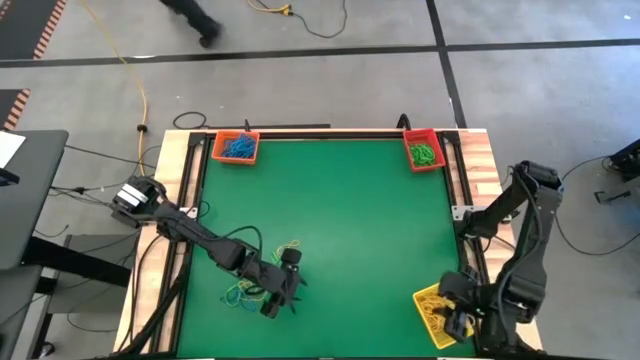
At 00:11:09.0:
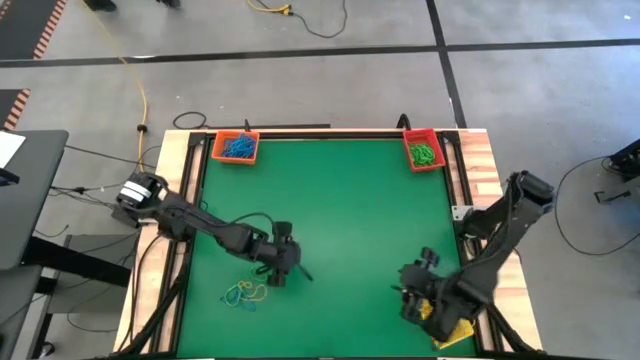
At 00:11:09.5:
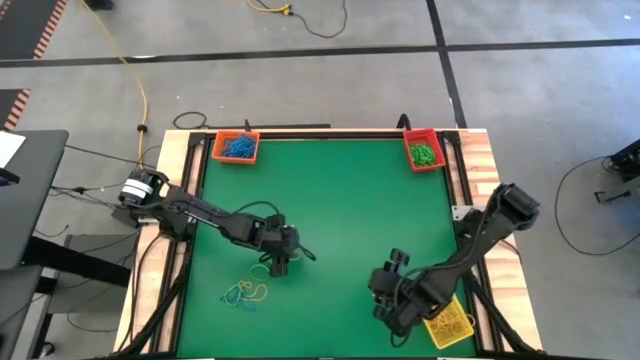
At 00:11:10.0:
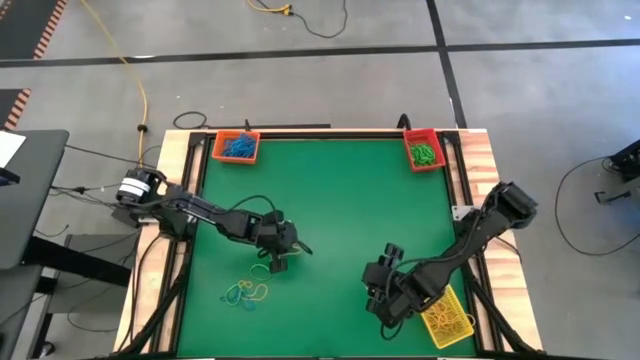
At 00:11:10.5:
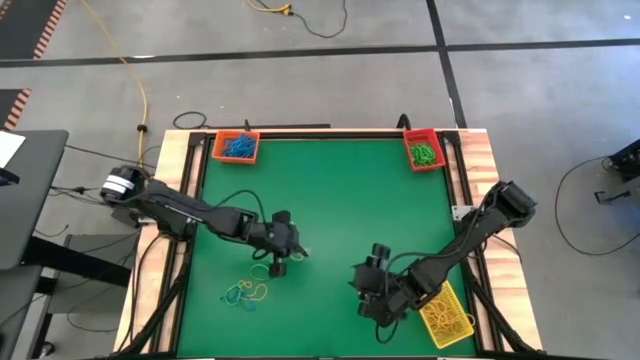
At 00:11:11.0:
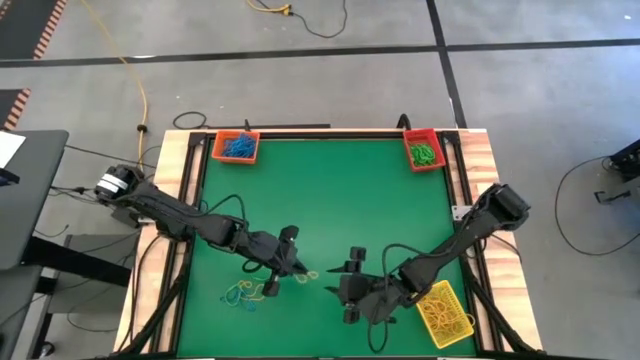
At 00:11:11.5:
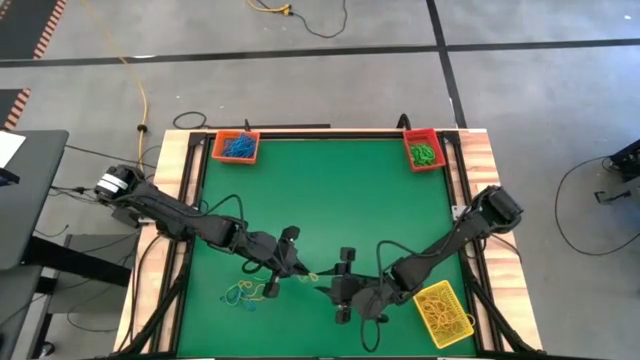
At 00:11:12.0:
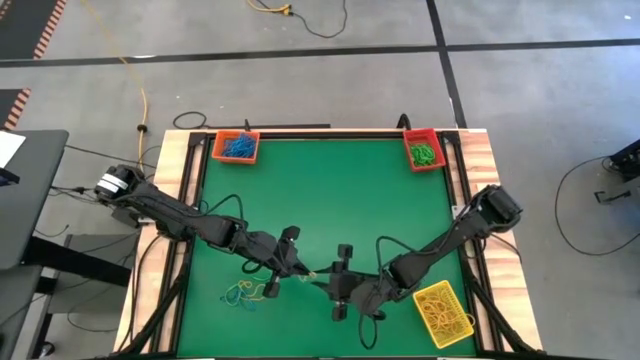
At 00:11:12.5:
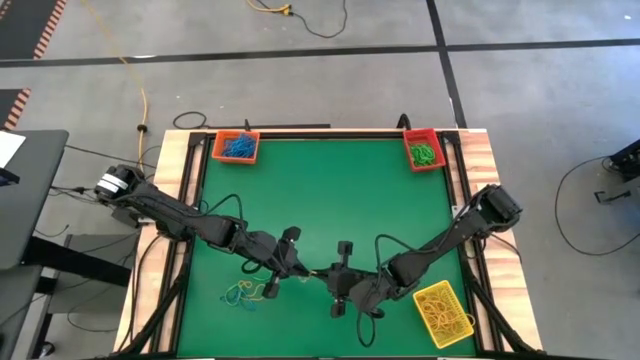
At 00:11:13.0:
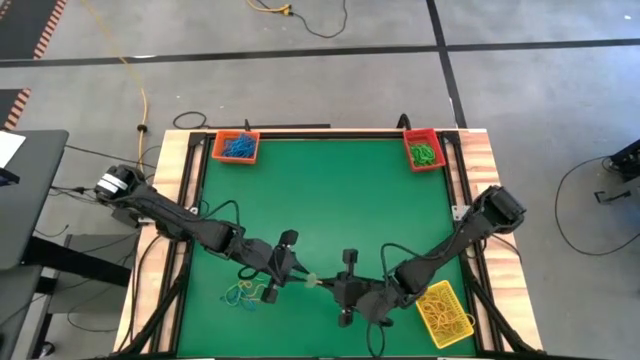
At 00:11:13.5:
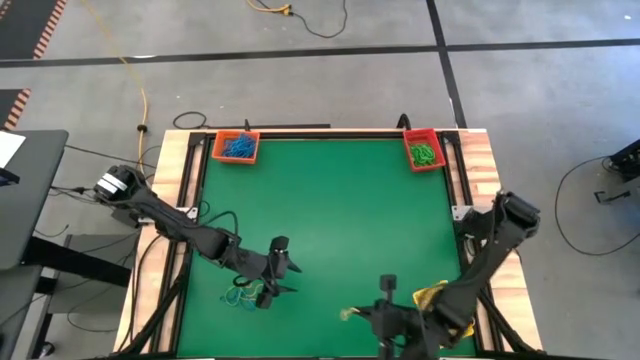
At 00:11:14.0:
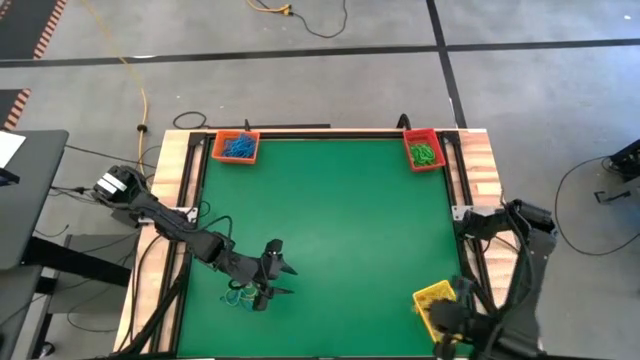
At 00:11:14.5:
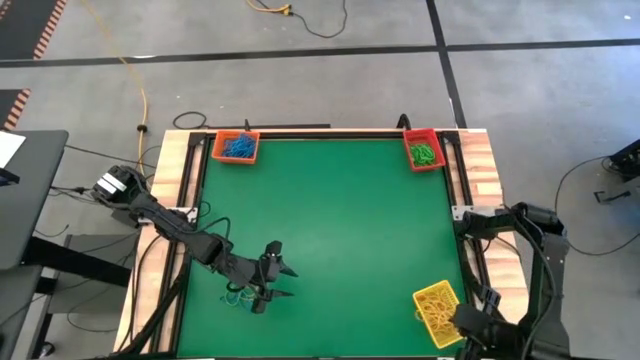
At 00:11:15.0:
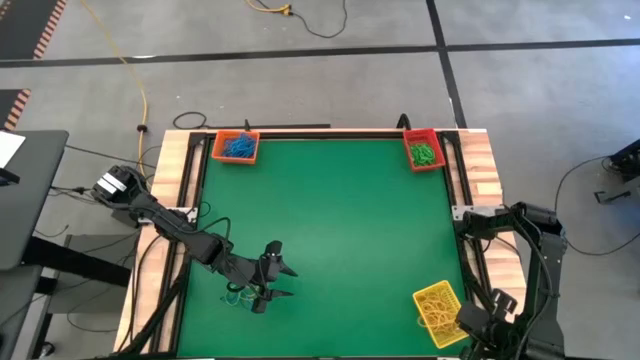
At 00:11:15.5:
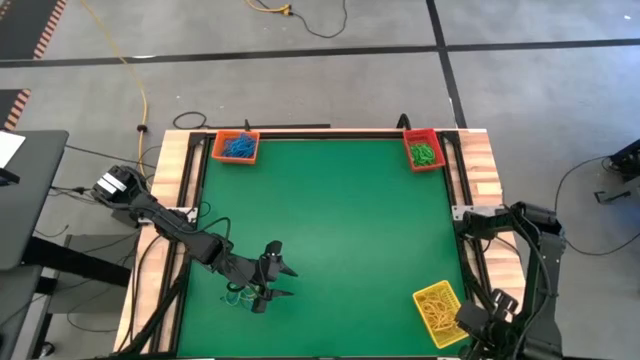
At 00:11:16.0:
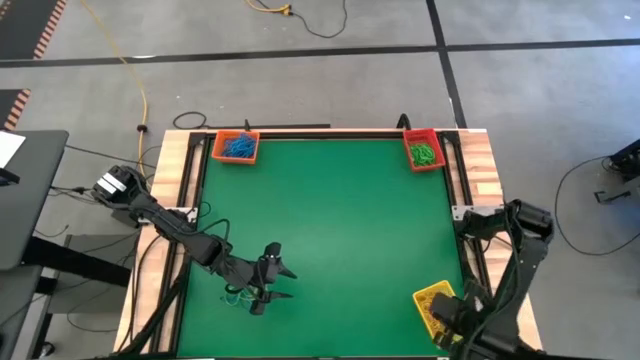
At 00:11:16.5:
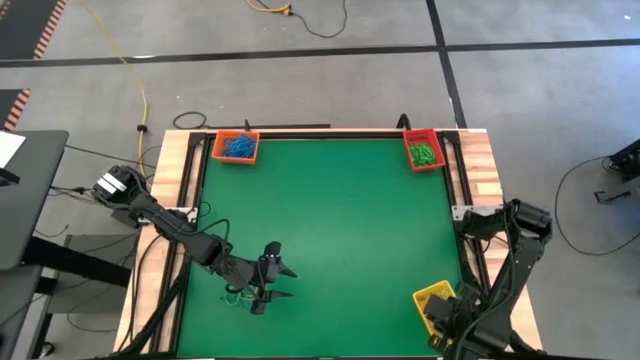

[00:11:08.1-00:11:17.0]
Task: Sort rubber bands into baskets
Put the left yellow rubber band into the yellow bin

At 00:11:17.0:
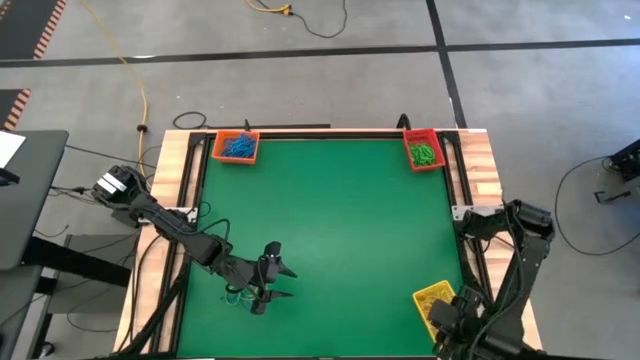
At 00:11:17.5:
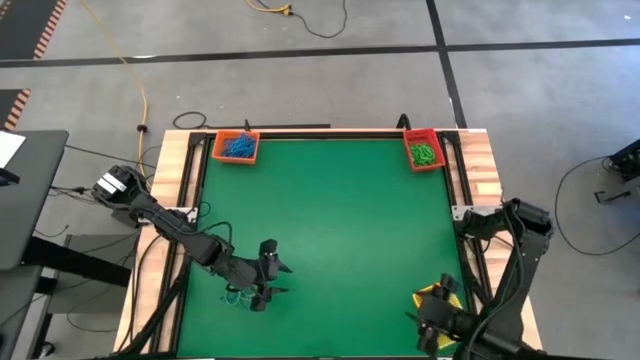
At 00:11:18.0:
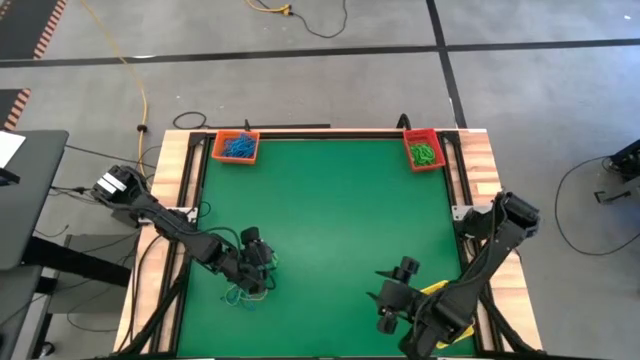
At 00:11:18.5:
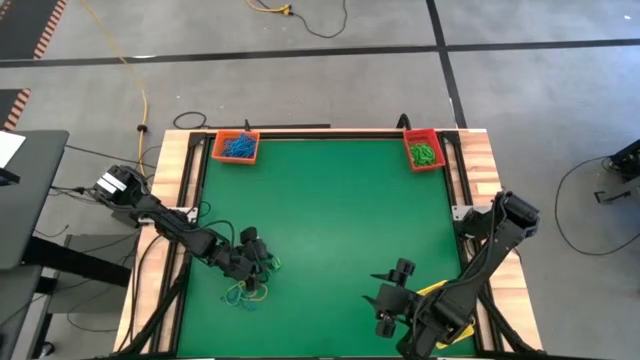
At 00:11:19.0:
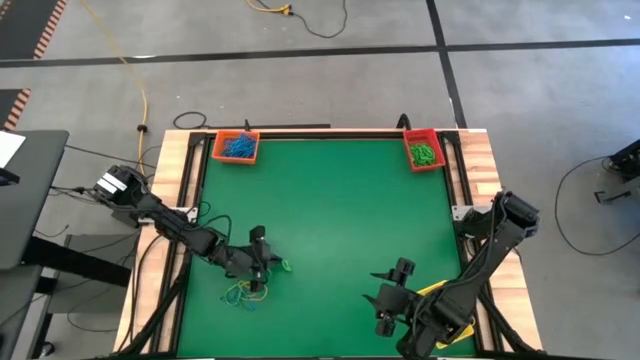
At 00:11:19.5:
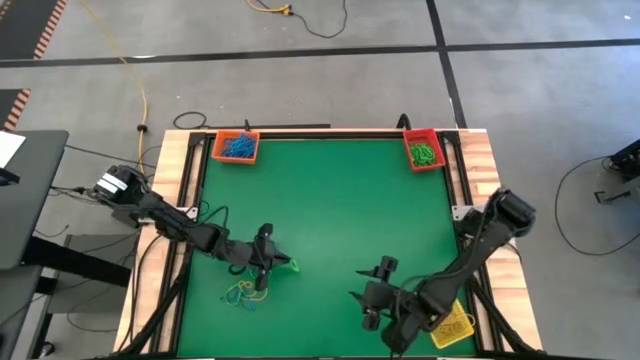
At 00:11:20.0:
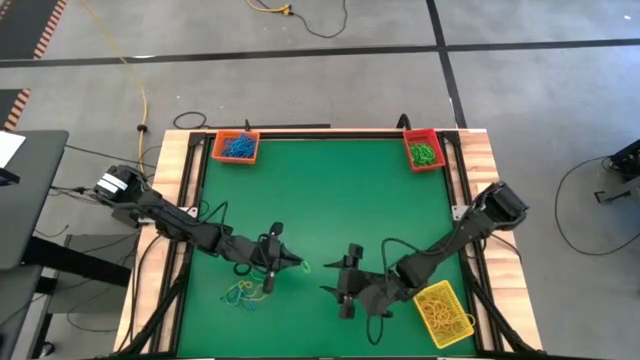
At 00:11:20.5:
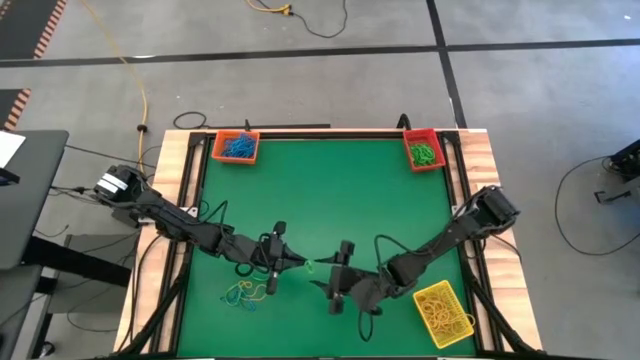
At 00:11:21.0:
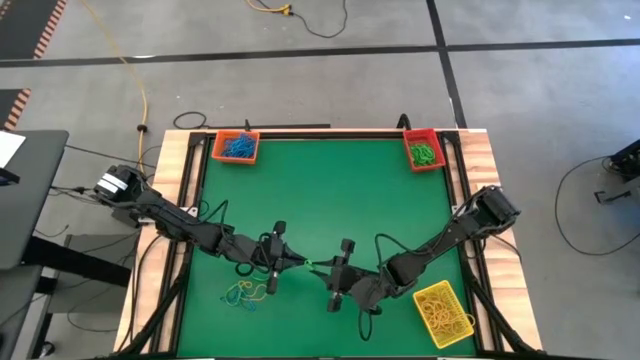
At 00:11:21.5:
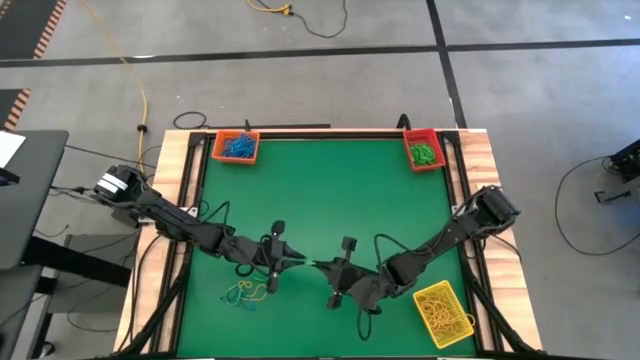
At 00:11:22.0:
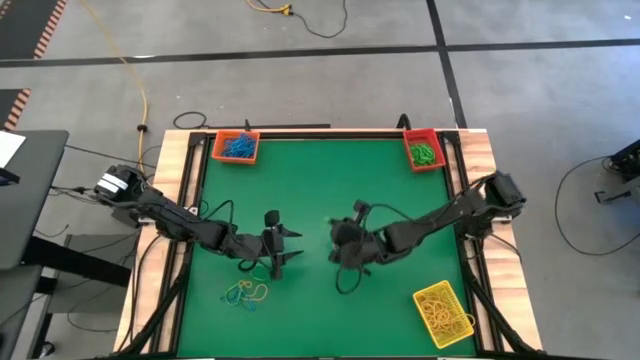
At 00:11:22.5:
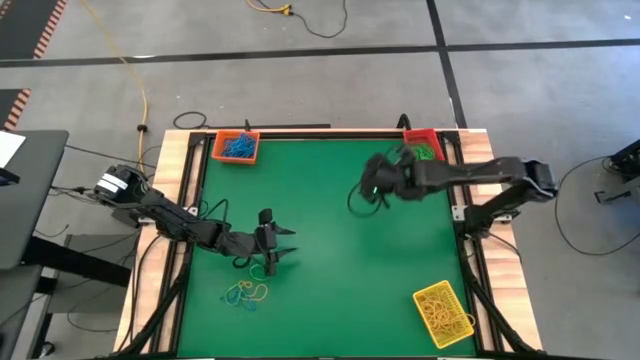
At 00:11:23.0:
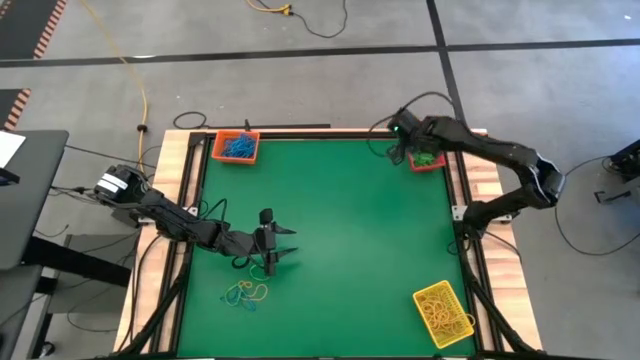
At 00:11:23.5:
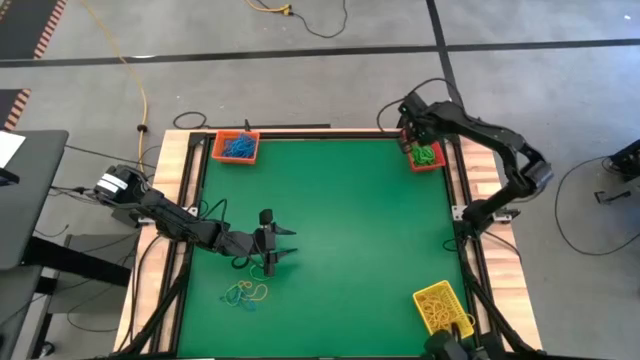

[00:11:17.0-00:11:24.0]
Put the left green rubber band into the red bin
